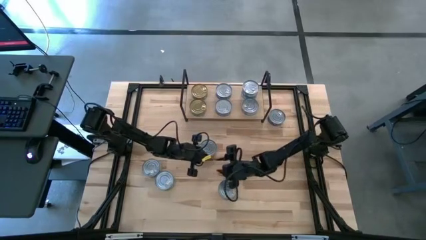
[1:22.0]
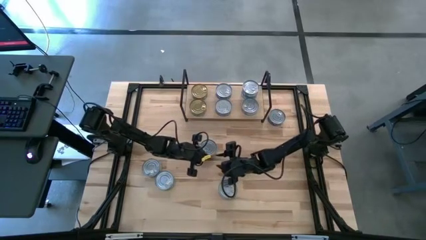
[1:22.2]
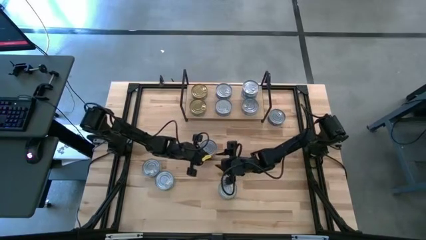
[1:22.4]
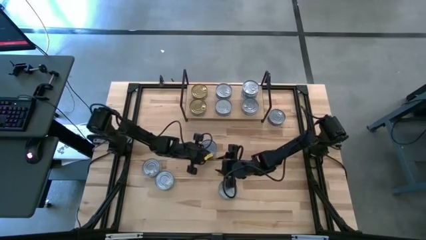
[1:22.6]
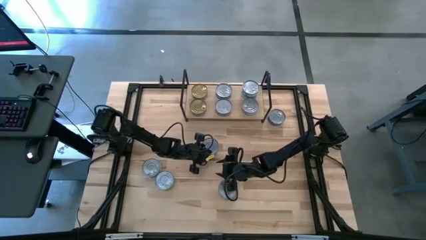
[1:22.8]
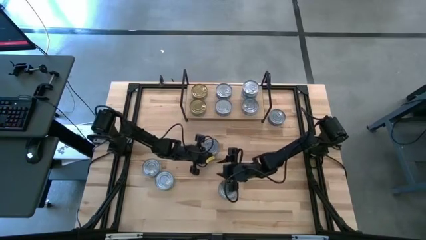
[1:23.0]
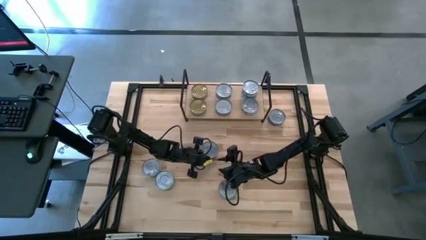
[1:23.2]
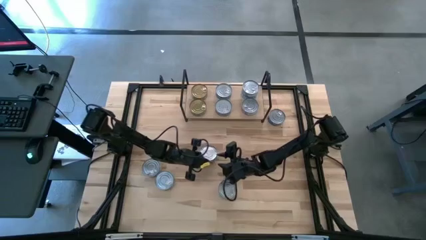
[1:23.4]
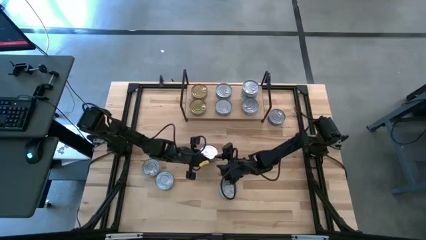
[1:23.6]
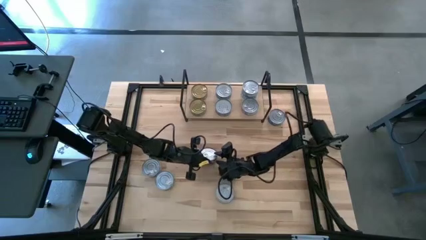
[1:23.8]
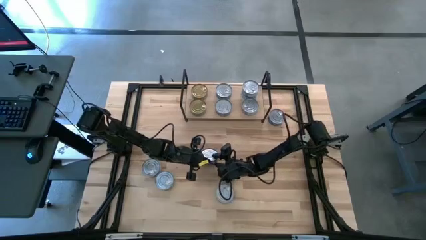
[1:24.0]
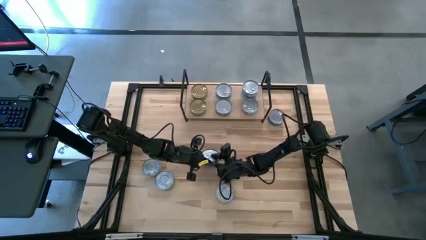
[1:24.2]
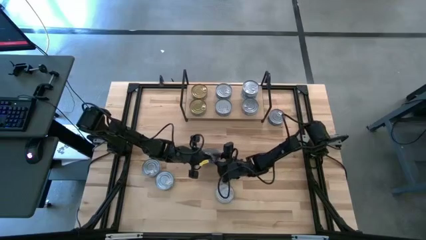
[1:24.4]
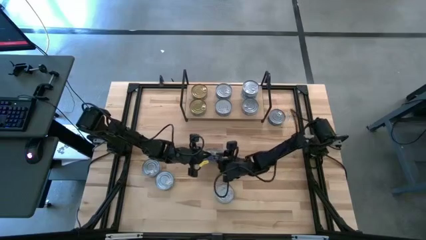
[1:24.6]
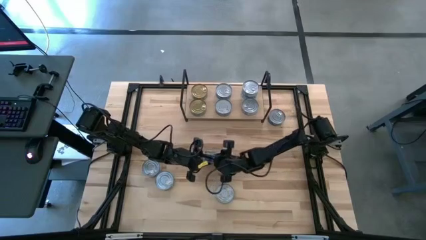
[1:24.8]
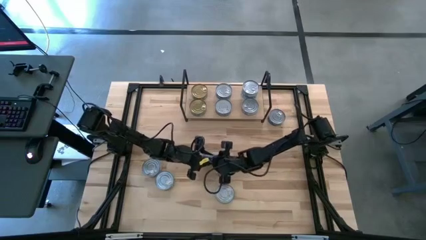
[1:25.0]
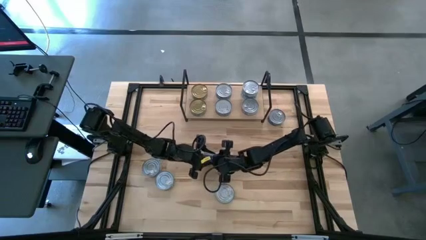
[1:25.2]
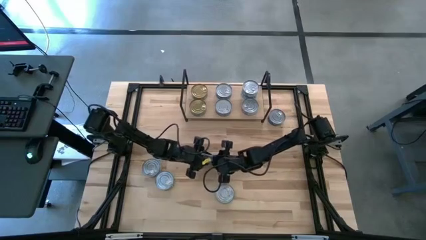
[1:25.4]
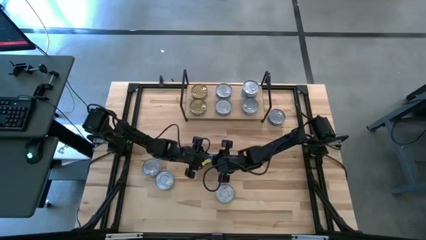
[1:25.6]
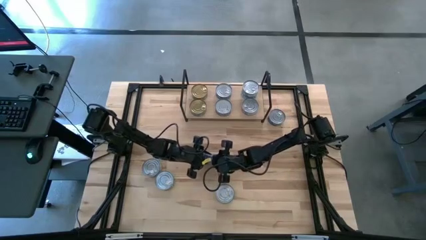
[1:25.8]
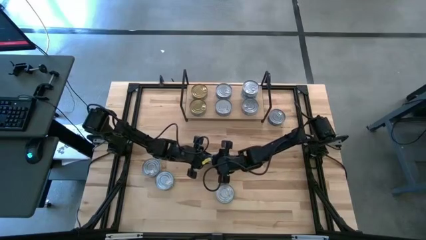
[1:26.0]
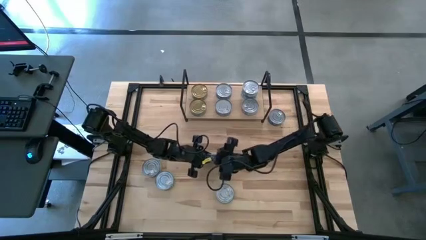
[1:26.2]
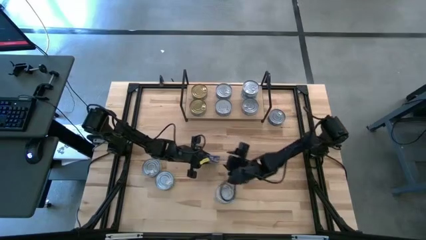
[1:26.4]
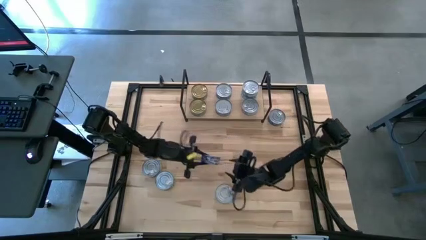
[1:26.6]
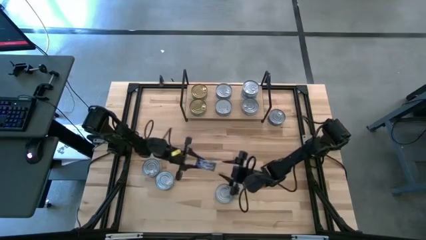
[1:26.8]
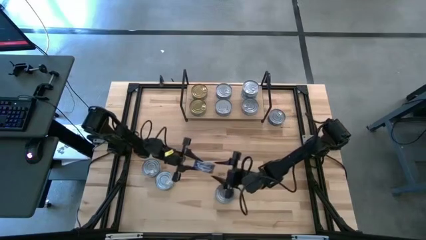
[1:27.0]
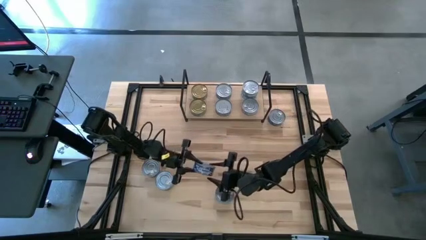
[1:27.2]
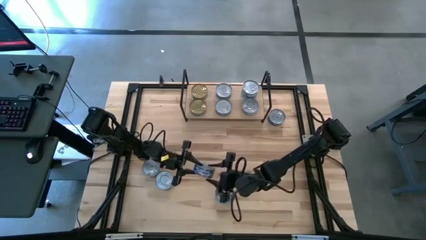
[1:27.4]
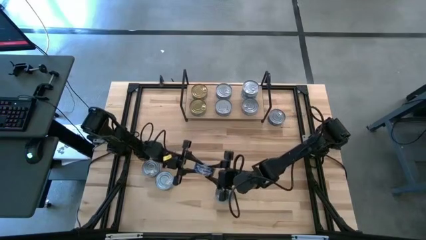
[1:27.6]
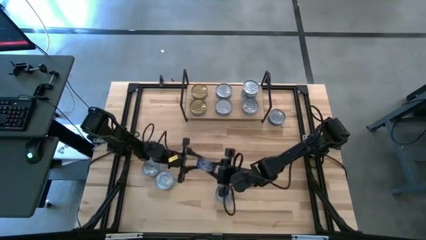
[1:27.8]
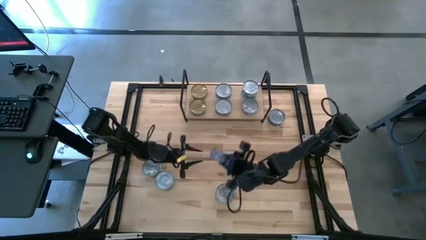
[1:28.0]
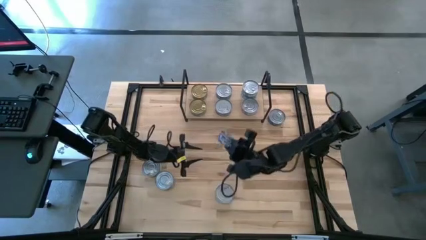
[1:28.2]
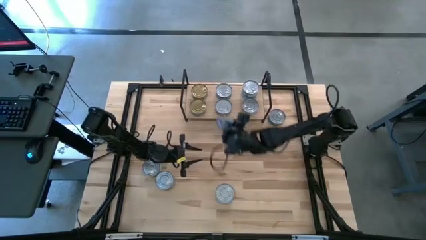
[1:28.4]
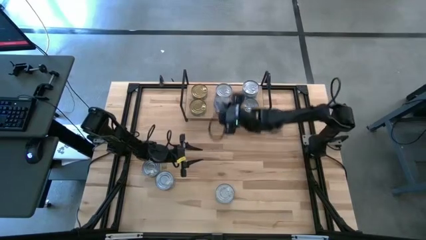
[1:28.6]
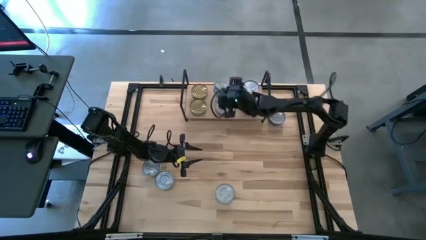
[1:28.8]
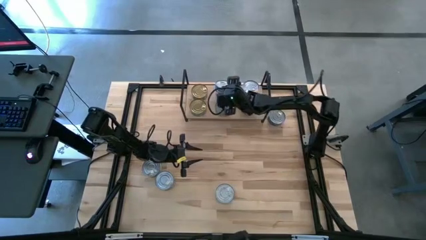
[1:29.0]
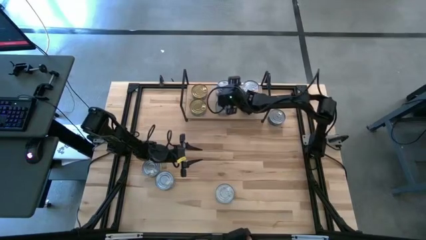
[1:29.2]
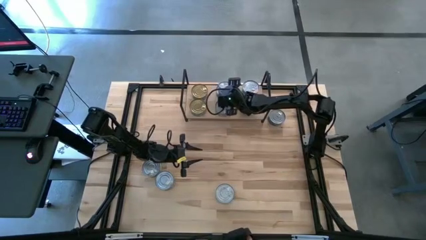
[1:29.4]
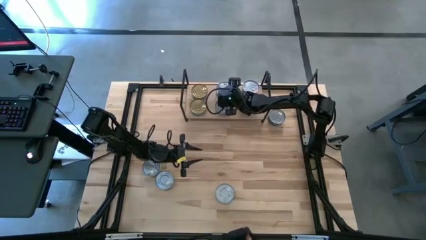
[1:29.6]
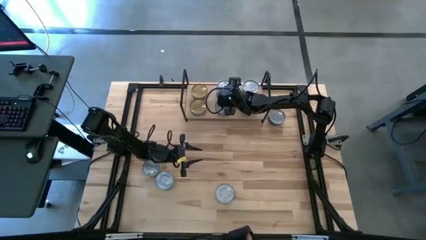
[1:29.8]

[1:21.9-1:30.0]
Task: Stack canned seafood by type on shelf
Stack the blue tuna can on top of the blue tuna can on the shelf

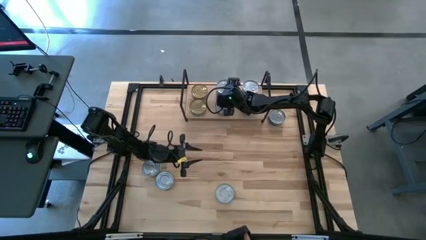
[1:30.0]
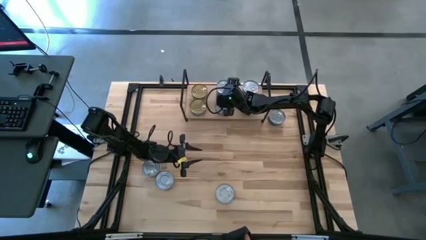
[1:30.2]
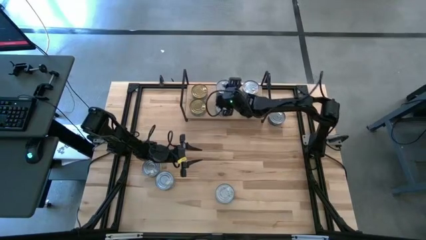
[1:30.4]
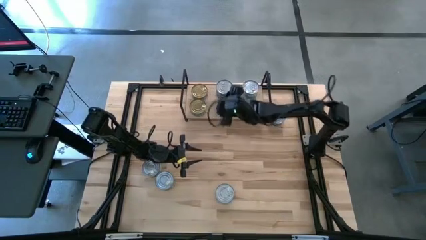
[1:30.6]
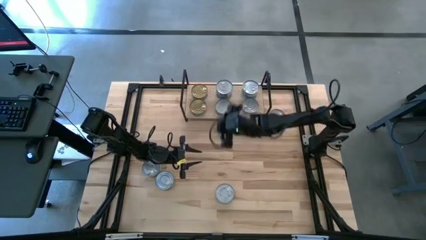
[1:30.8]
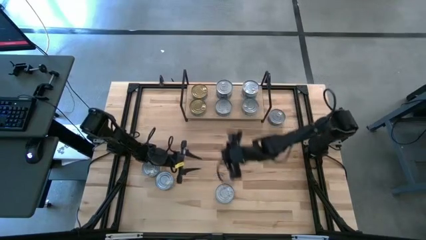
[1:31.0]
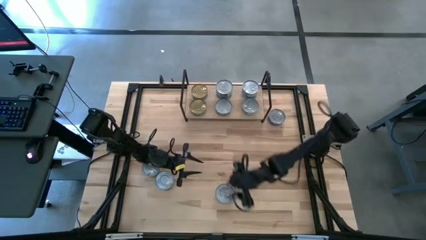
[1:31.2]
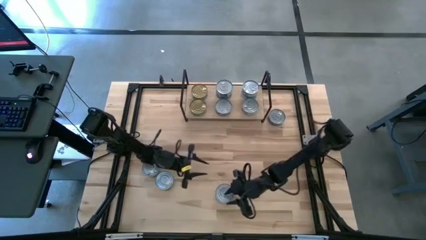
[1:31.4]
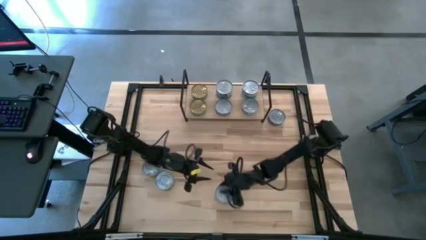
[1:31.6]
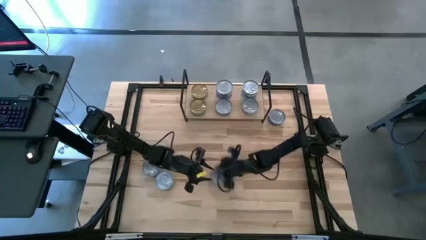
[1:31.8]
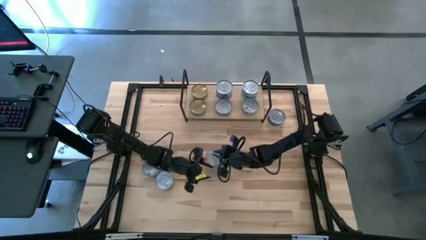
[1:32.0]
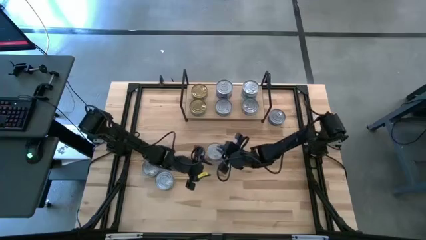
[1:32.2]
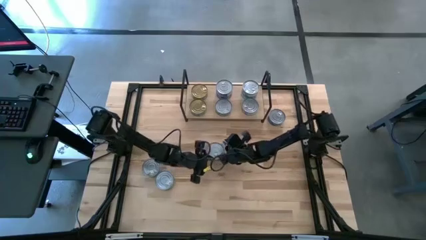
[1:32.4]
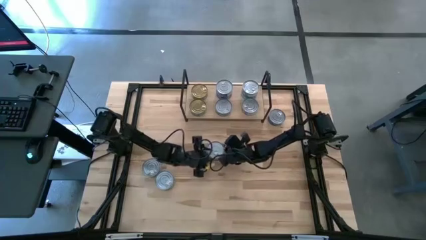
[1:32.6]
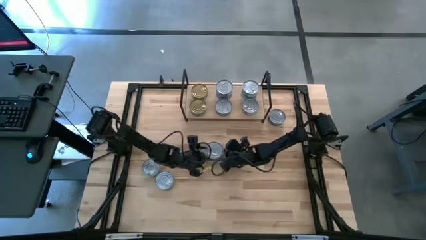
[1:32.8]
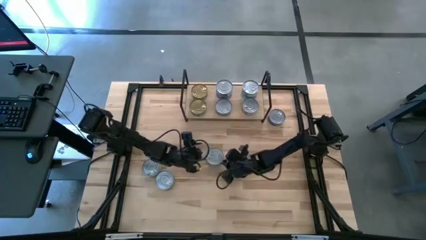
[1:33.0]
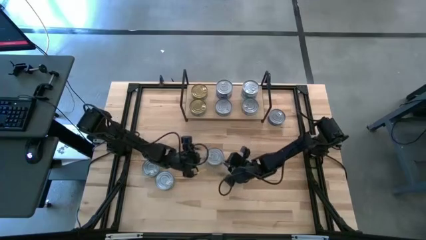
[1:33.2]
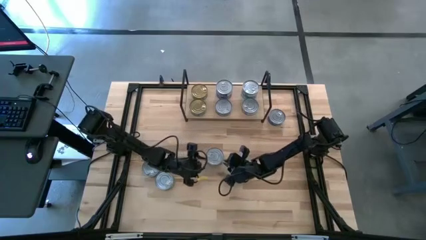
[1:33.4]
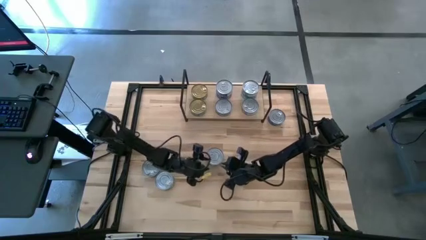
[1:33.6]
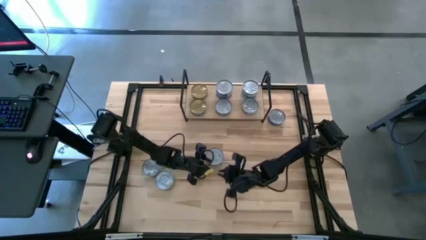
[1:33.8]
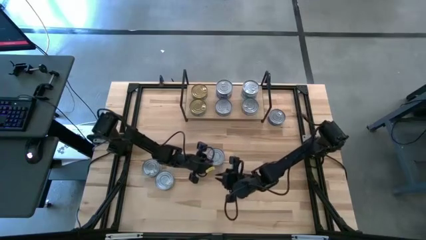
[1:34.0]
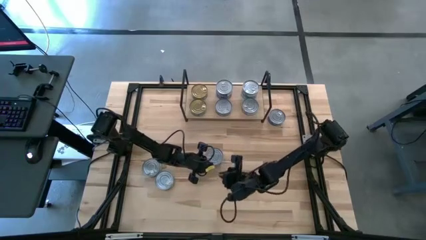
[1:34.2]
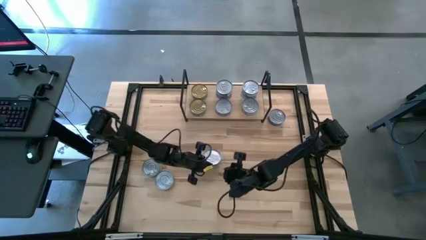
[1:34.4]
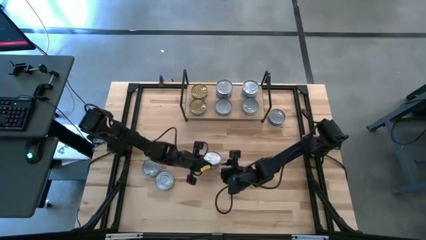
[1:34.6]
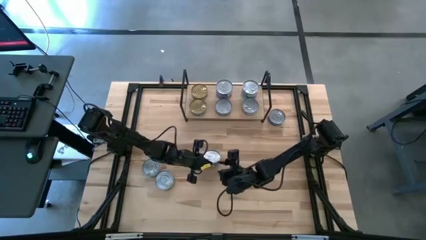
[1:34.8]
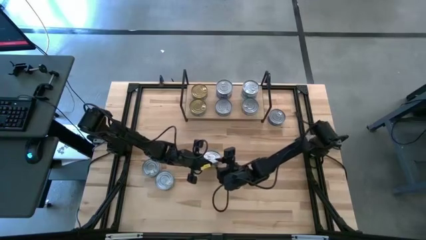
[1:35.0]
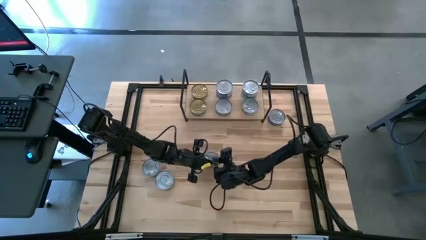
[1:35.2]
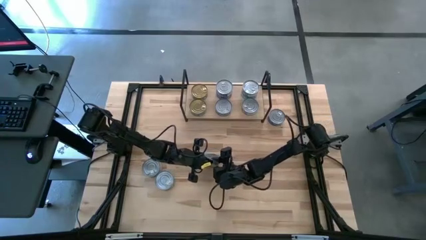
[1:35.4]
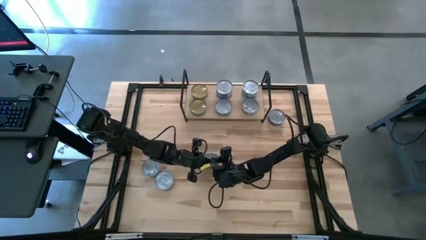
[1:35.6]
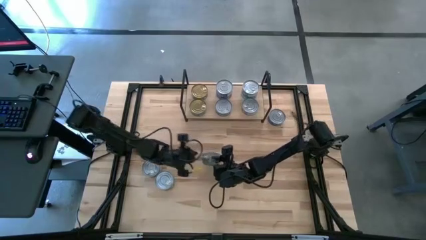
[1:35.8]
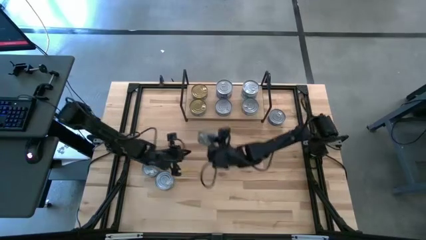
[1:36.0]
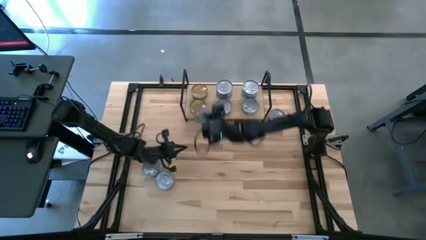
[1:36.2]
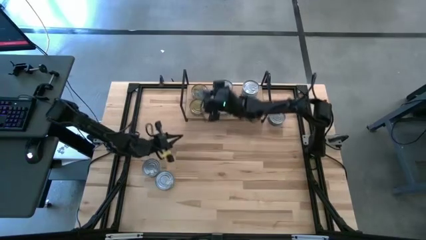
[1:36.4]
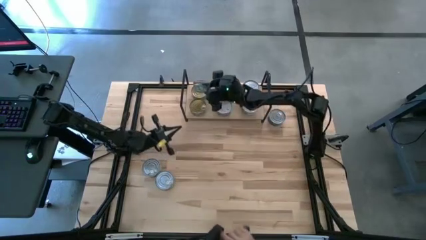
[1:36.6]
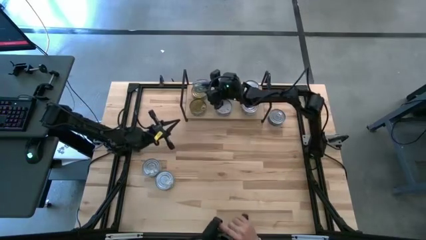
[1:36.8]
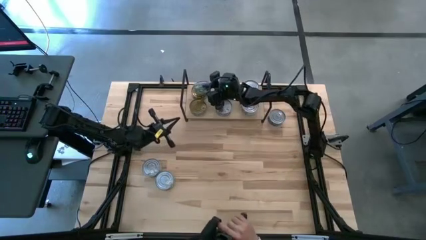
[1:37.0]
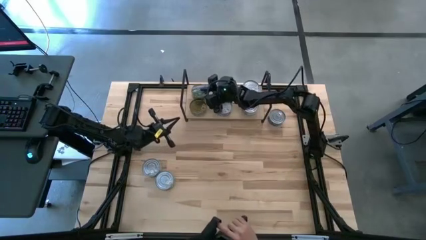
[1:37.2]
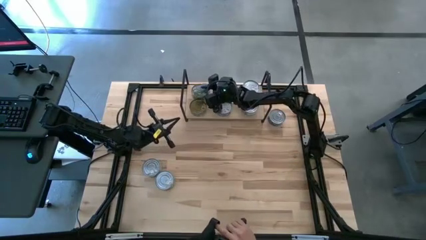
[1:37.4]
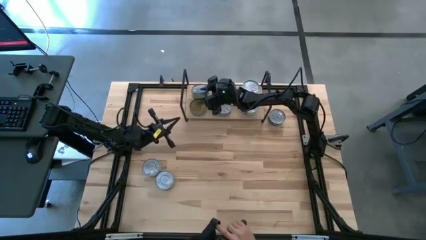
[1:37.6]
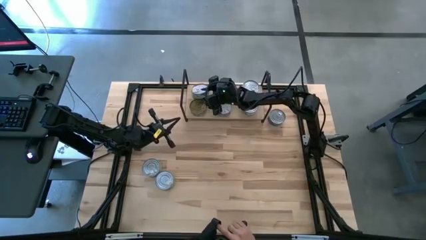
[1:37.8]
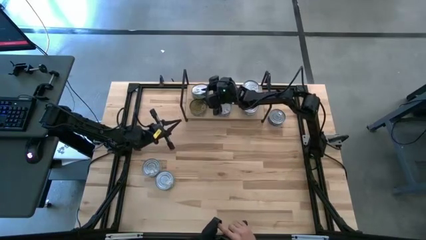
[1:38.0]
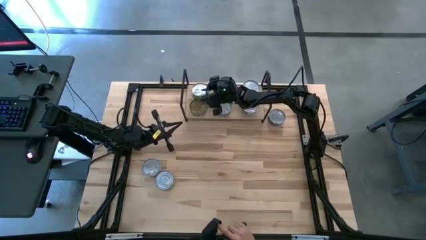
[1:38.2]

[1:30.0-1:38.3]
Stack the green tuna can on top of the green tuna can on the shelf

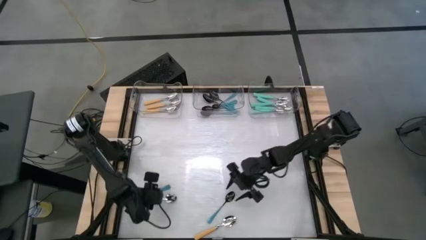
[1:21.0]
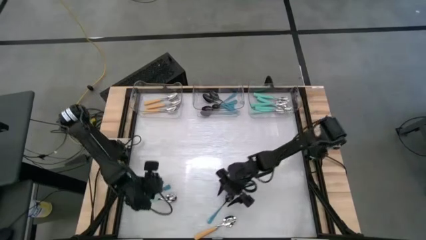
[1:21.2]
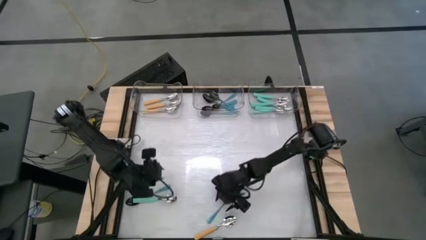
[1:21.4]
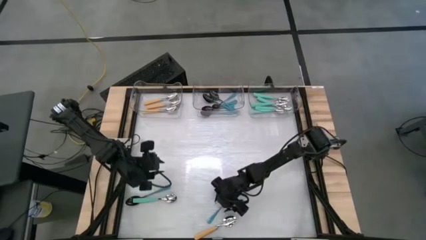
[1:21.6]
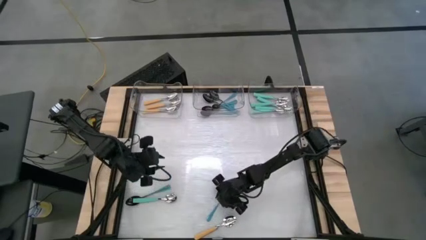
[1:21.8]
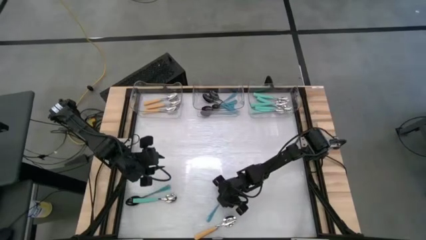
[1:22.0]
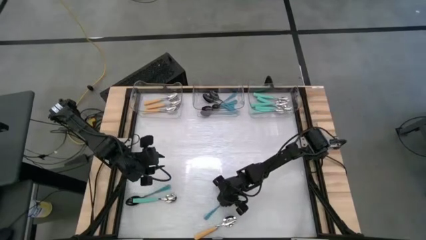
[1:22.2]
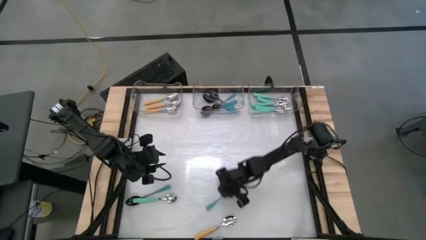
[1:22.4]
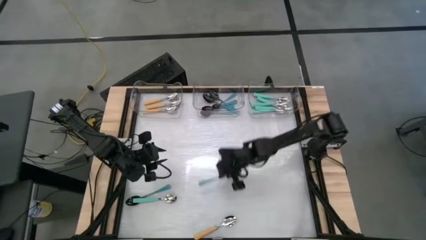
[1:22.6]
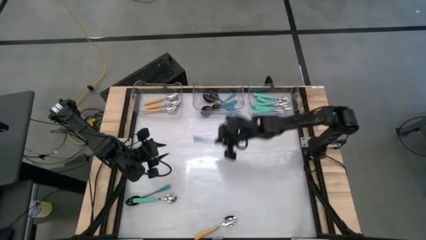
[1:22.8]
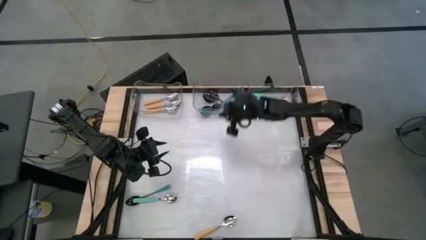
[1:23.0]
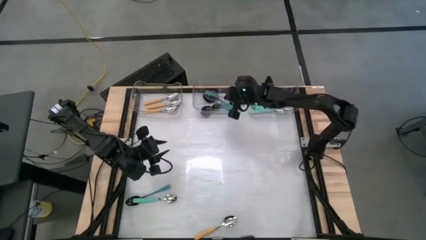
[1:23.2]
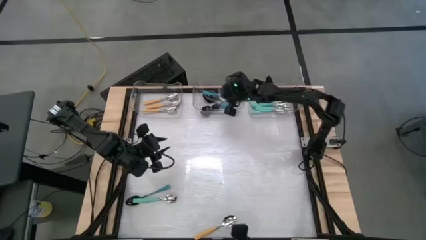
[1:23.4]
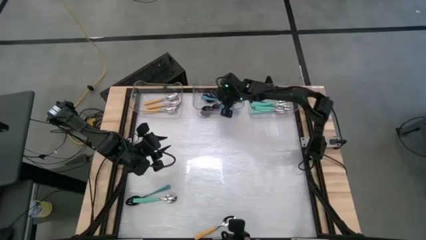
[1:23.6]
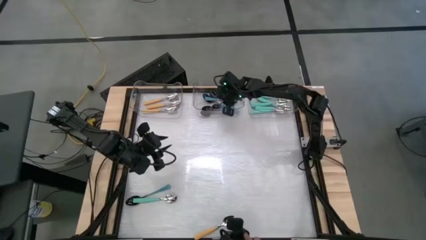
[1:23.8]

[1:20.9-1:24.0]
Task: Sort silverware by color (type)
Put the blue spoon into the middle transparent bin
